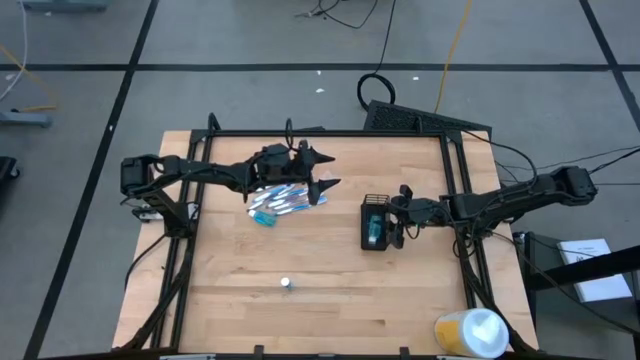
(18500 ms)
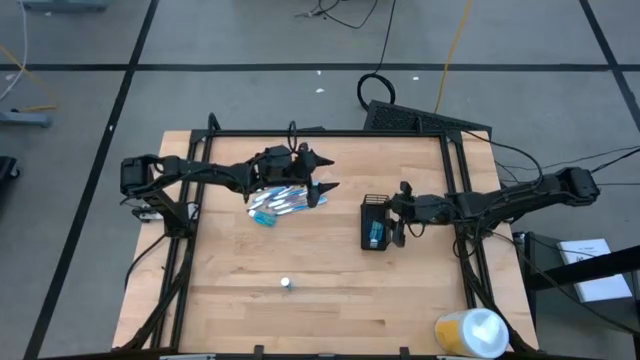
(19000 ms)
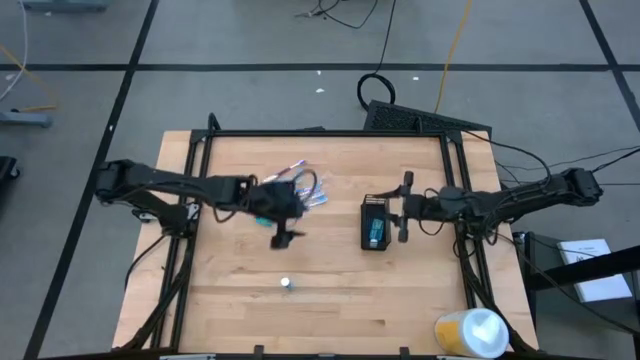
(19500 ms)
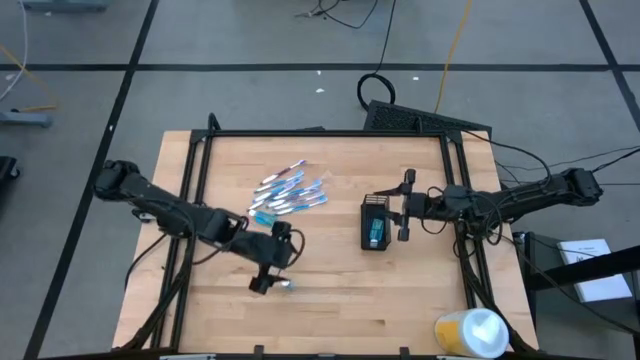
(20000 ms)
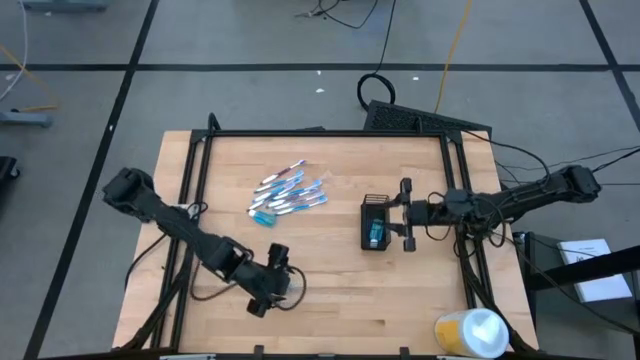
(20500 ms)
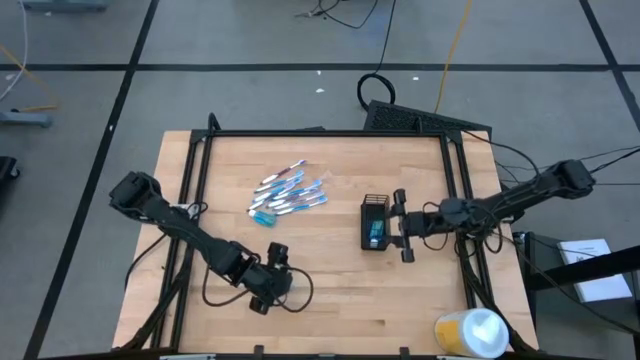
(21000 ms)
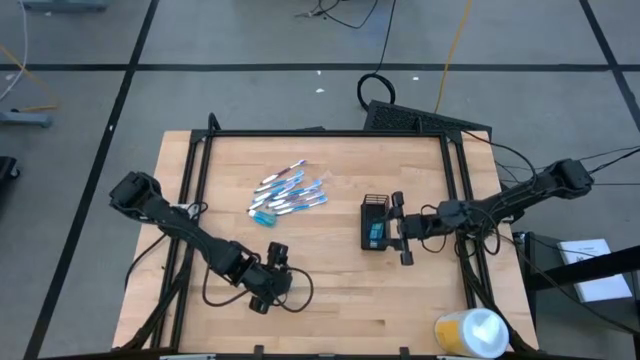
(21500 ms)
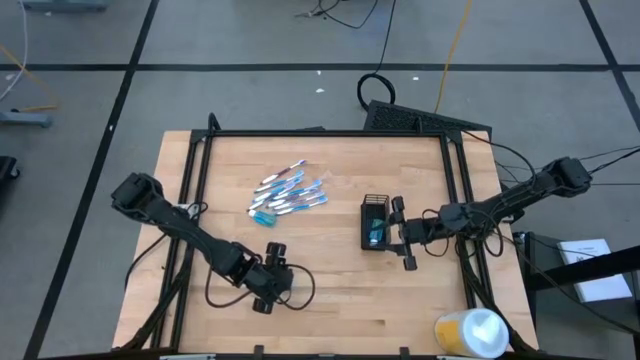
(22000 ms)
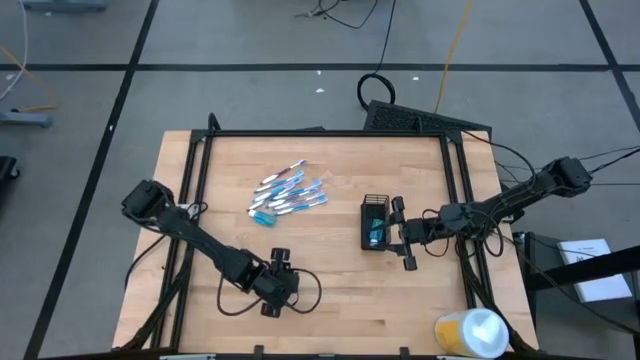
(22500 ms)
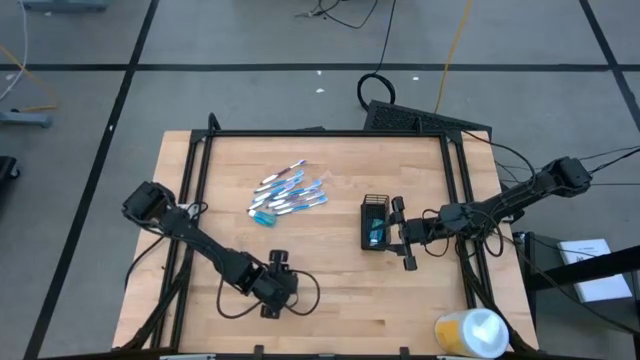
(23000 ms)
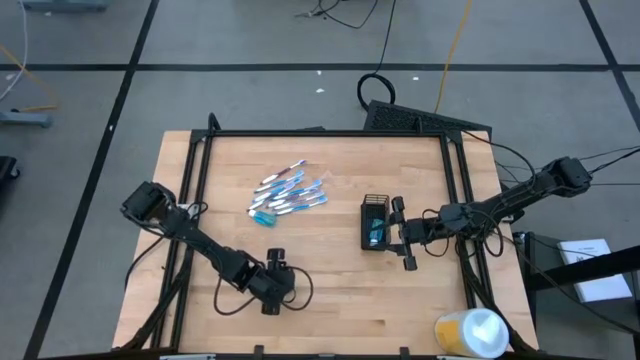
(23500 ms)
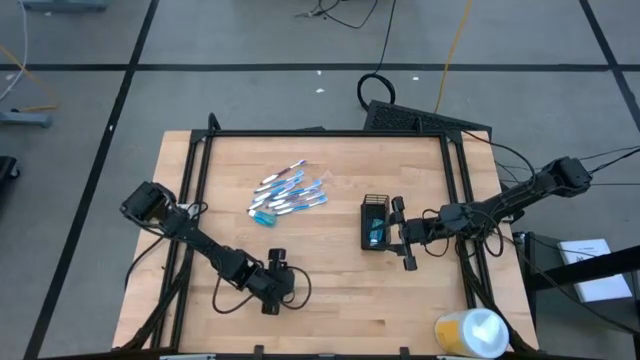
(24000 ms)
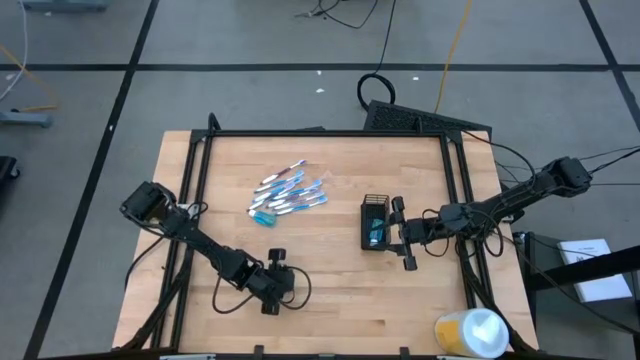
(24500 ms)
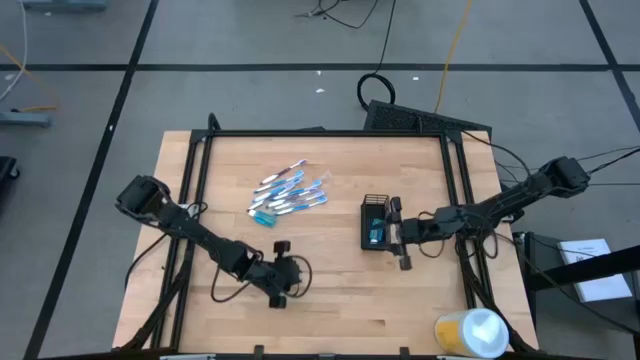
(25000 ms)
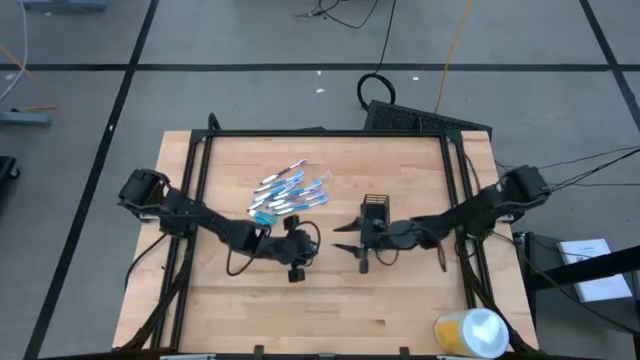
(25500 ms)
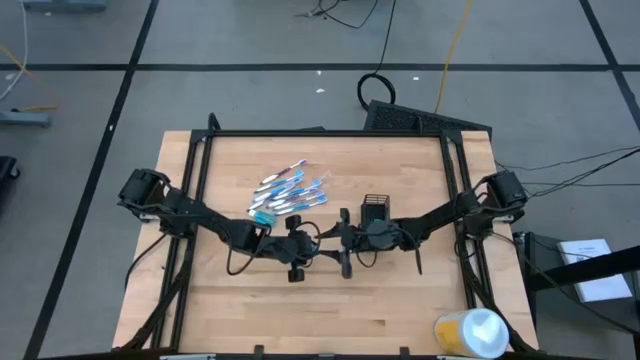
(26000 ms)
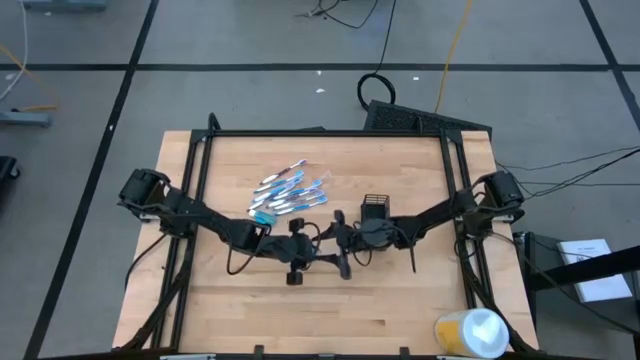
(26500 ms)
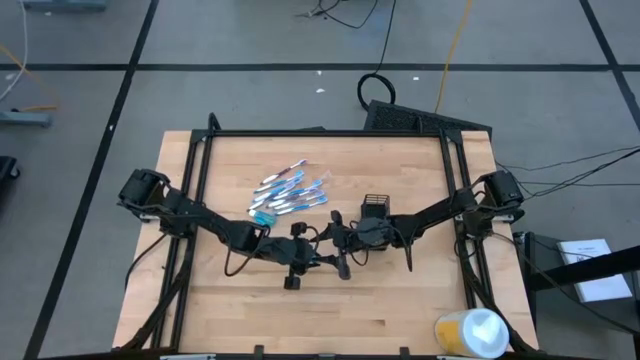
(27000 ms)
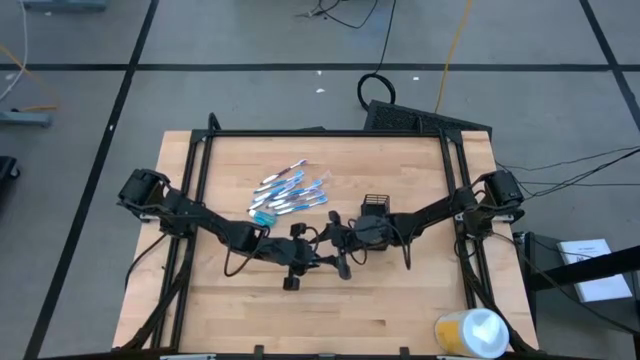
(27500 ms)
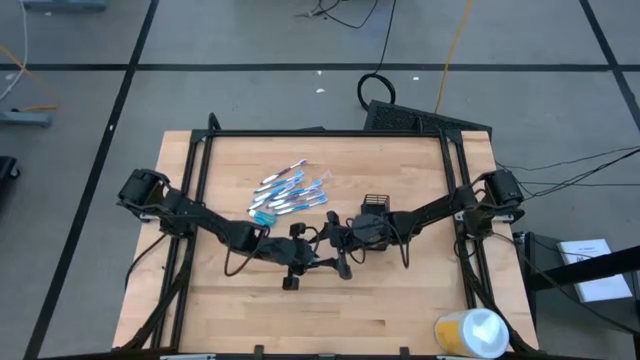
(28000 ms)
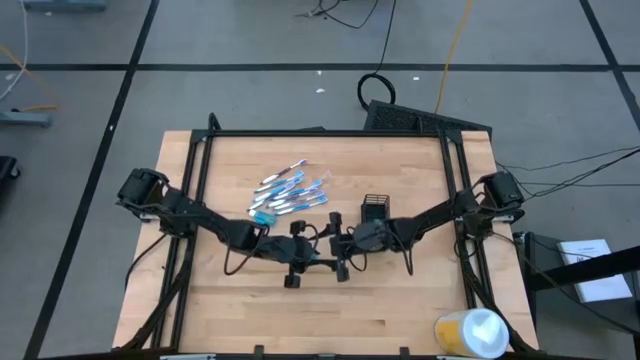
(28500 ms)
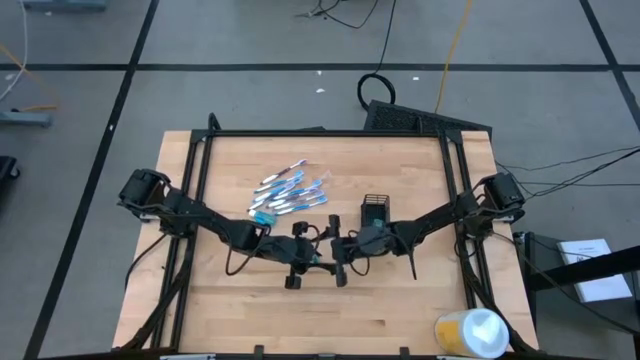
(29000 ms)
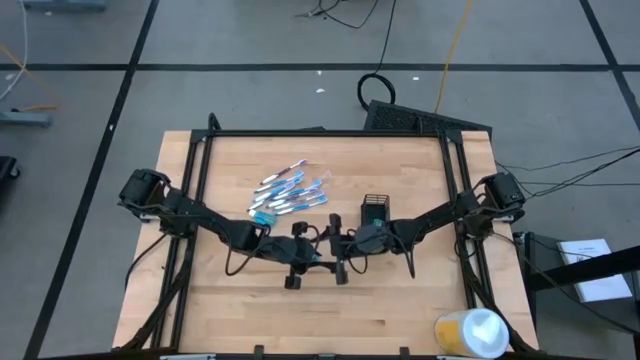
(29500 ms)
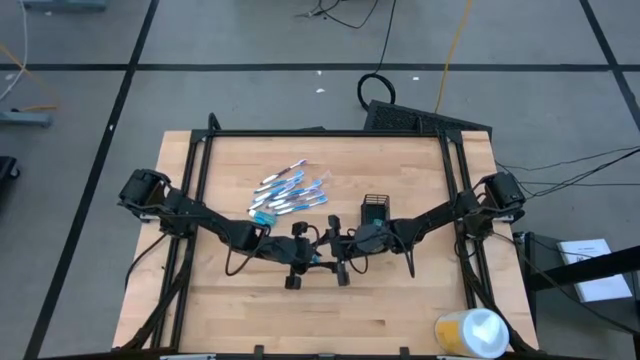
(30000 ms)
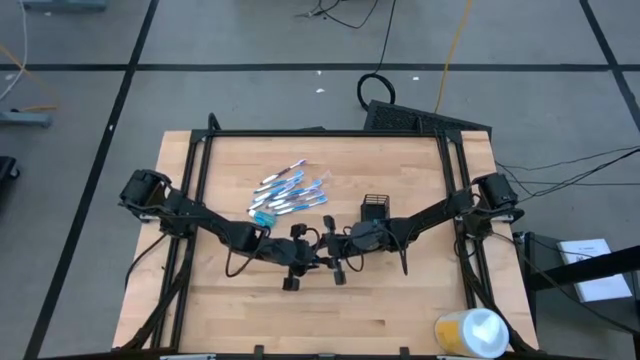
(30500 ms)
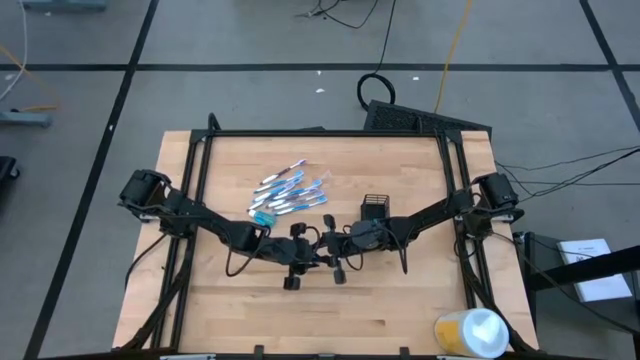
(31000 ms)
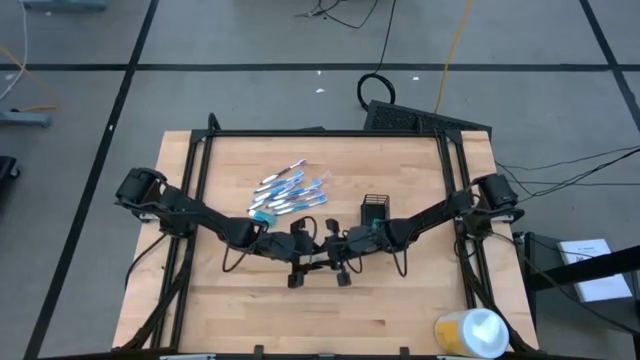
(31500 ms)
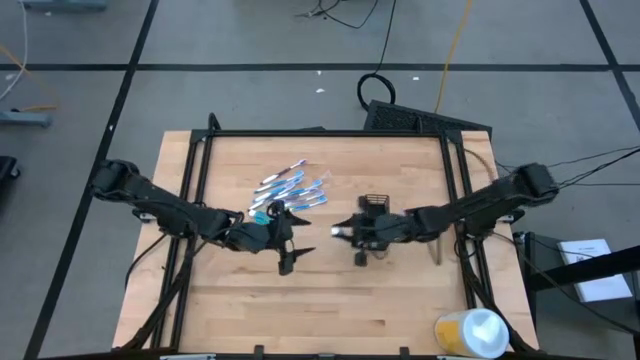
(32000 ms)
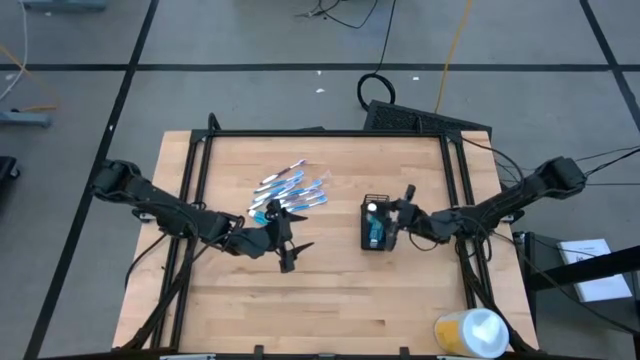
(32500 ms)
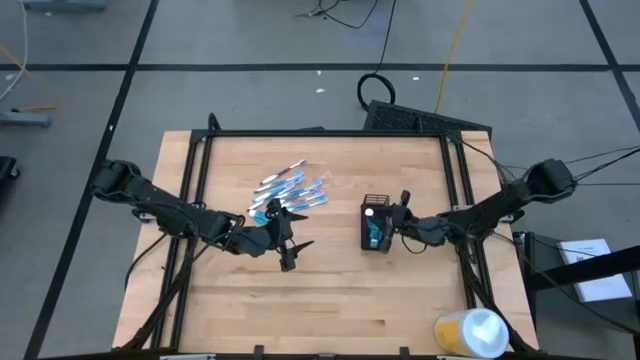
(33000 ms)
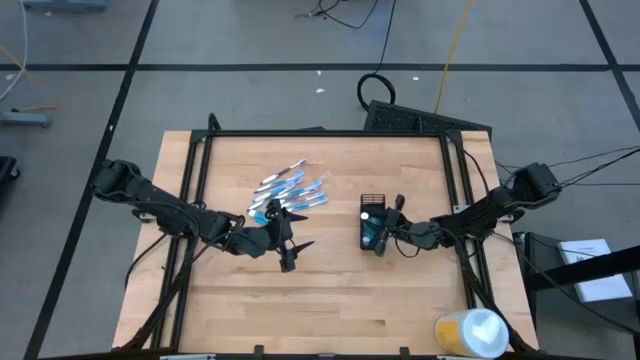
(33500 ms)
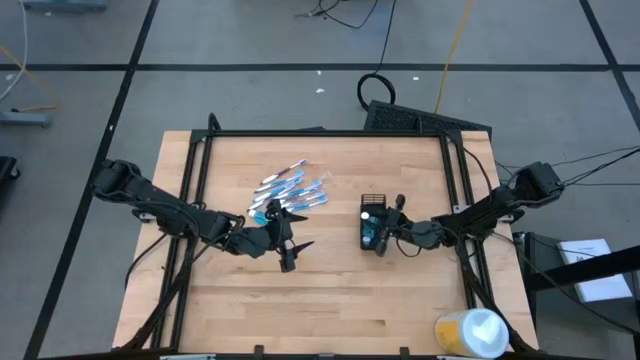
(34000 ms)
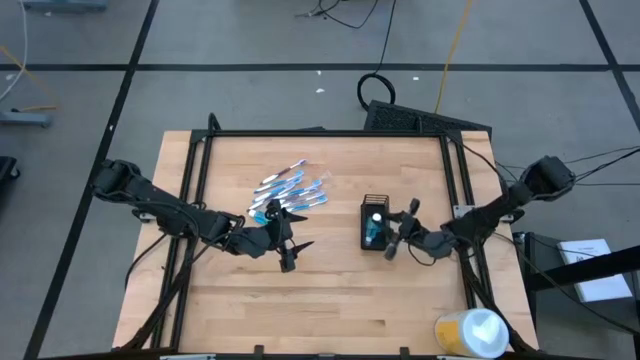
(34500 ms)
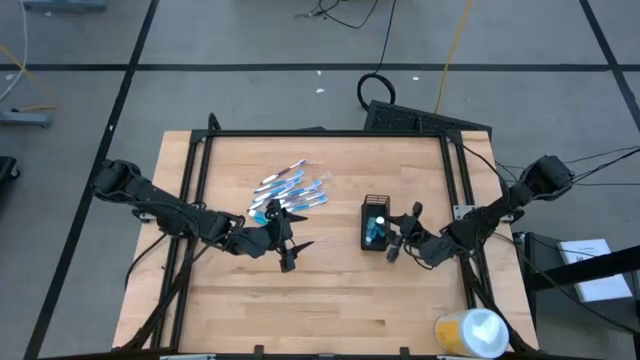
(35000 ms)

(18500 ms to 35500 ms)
Task: Pick & Place toothbrushing station
Put the mouthwash into the middle section of the mesh organizer

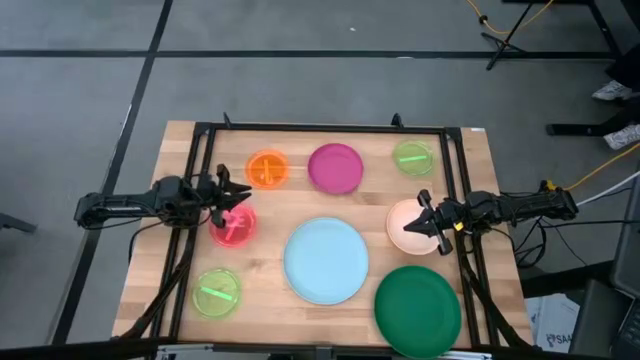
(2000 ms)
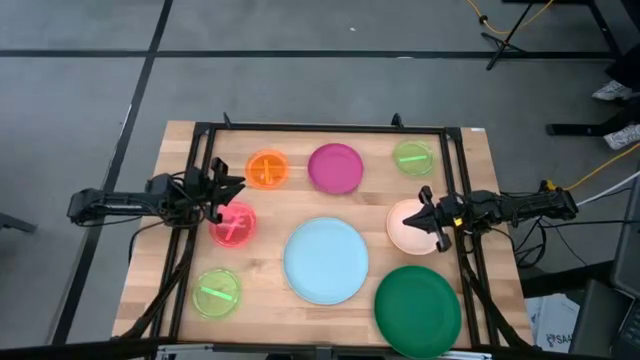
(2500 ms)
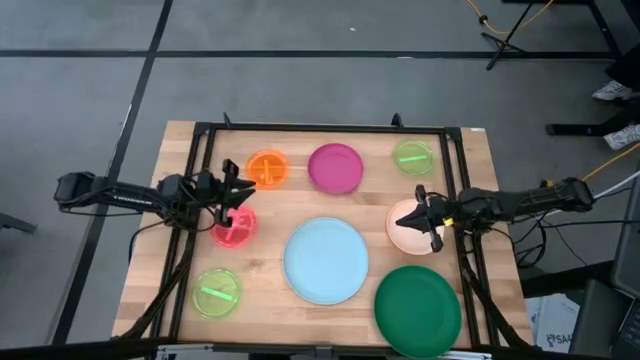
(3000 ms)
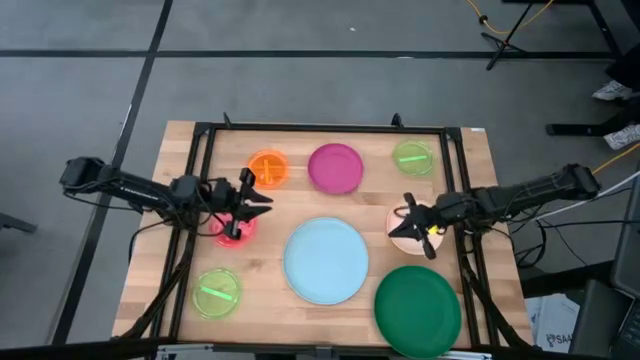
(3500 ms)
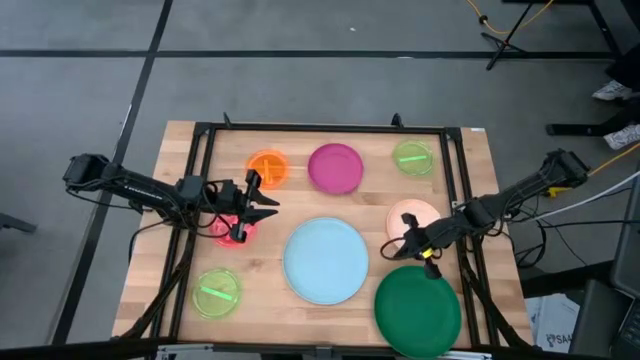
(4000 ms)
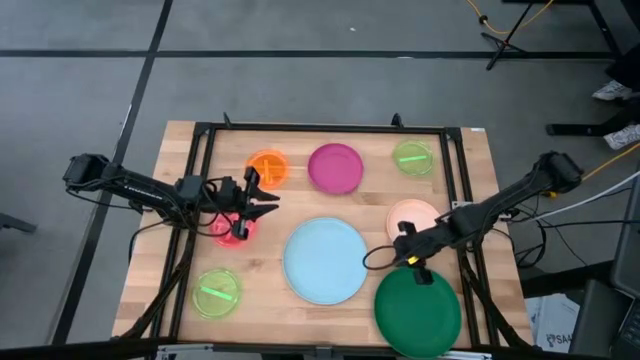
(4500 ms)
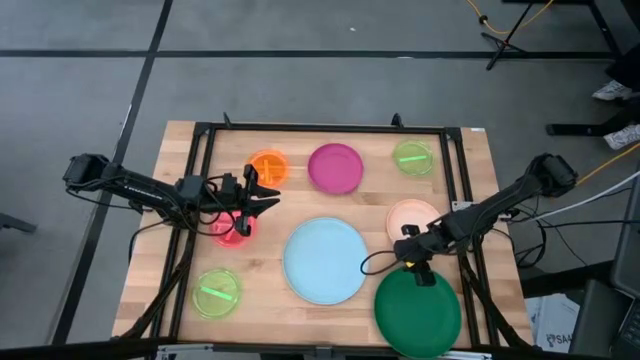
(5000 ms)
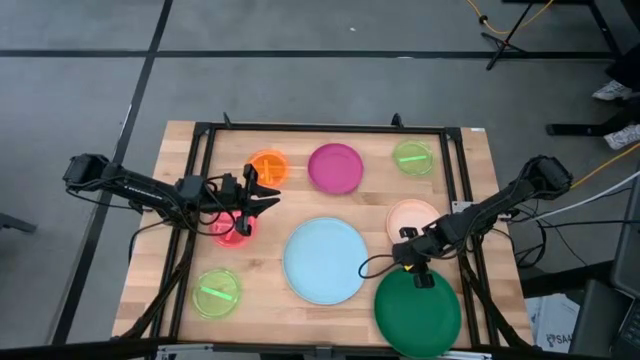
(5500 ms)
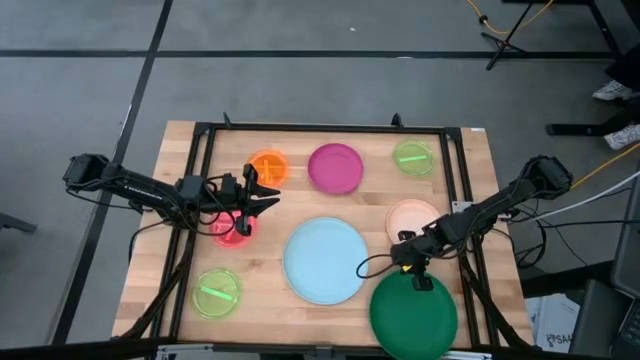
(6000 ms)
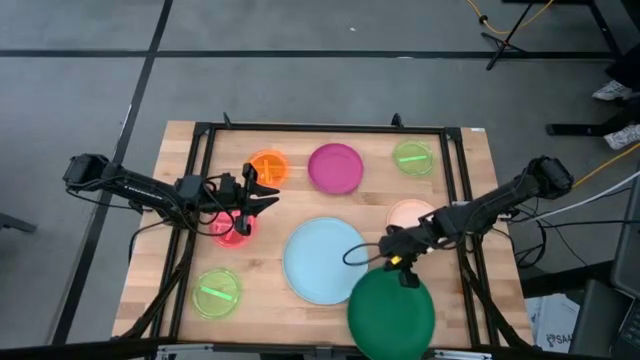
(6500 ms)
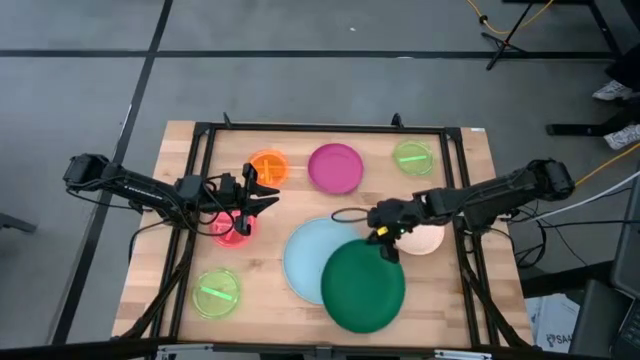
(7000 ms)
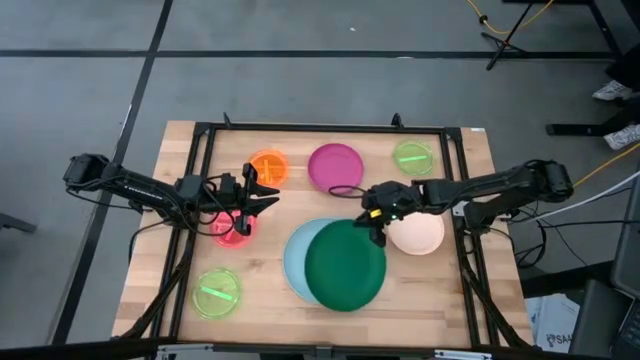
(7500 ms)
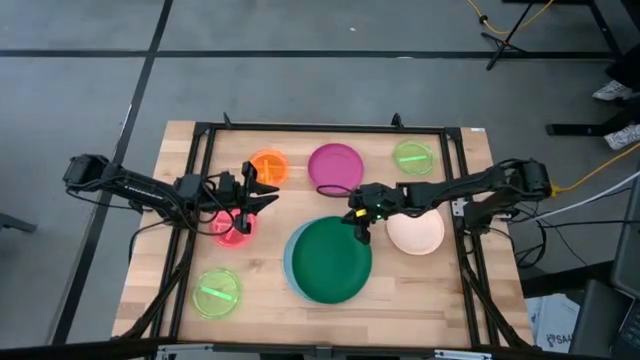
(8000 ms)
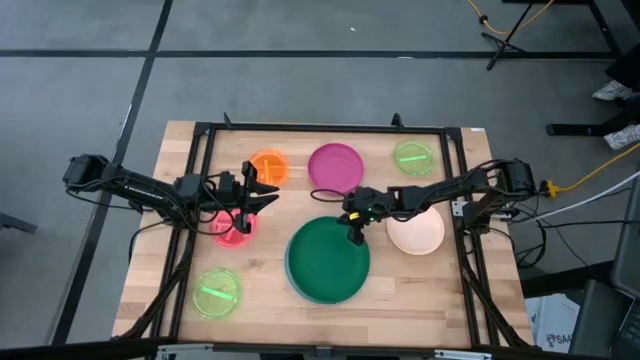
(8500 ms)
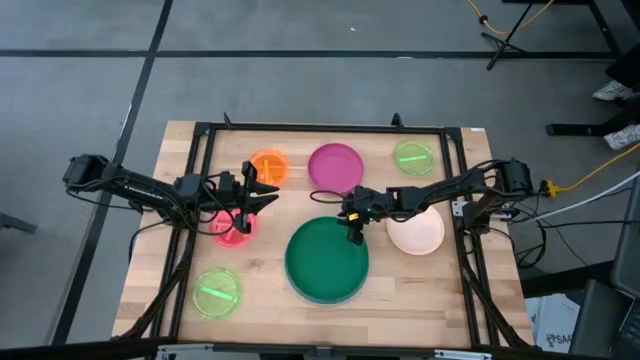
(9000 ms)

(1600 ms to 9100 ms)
Task: Stack plastic plates
Stack the dark green plate on top of the blue plate
